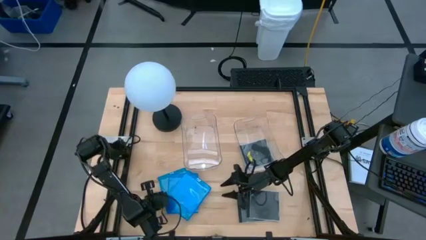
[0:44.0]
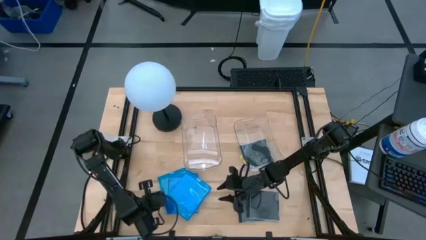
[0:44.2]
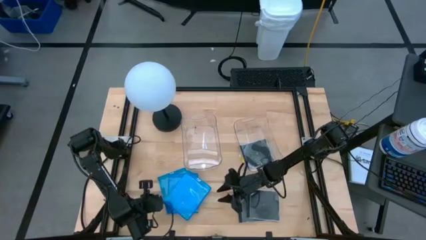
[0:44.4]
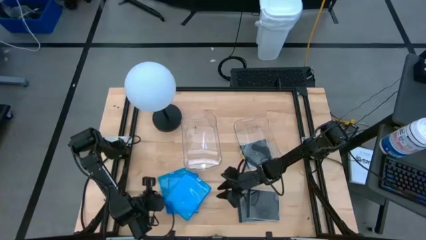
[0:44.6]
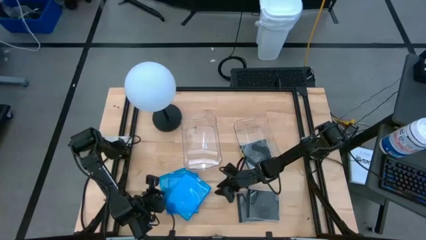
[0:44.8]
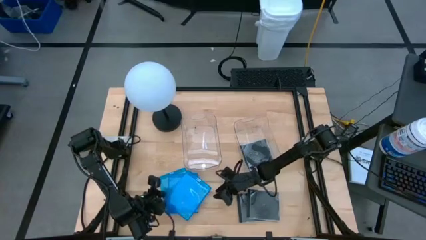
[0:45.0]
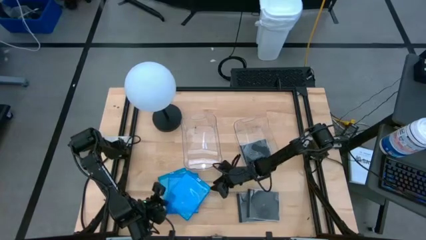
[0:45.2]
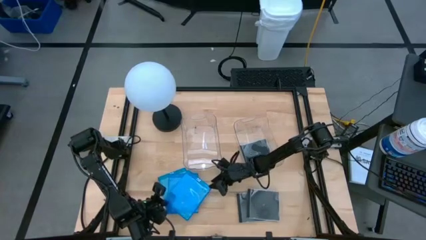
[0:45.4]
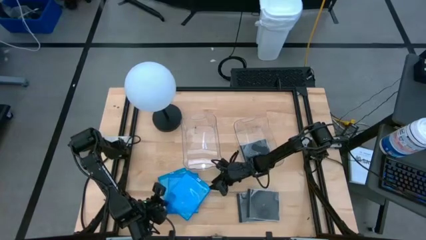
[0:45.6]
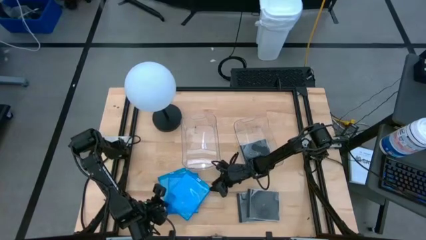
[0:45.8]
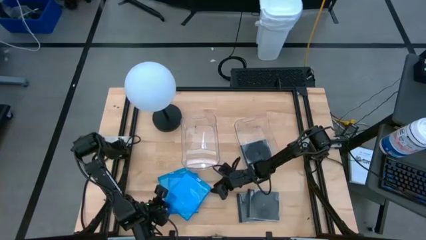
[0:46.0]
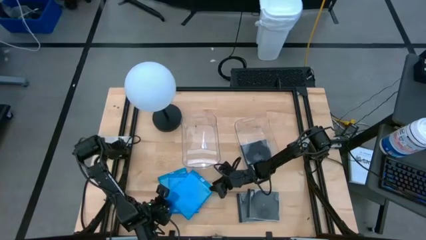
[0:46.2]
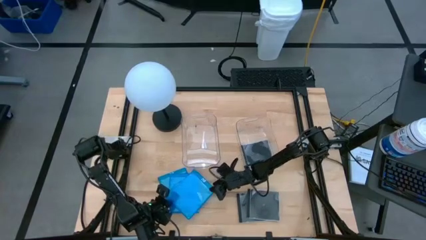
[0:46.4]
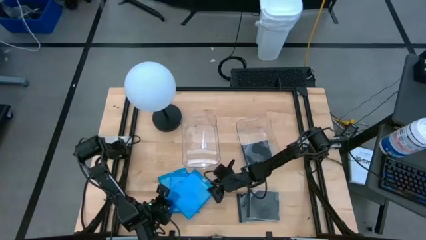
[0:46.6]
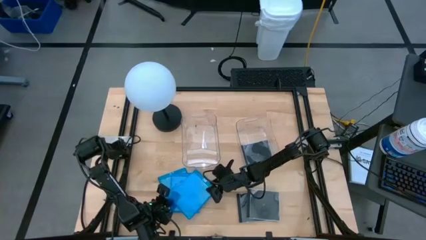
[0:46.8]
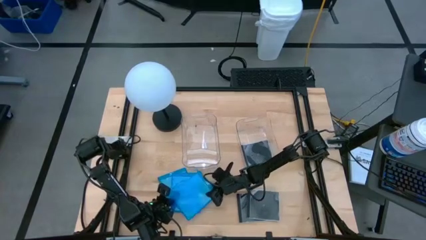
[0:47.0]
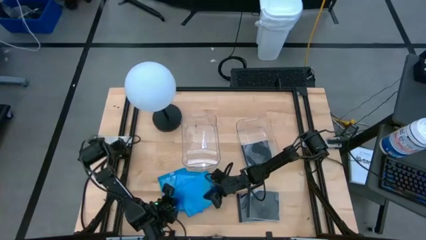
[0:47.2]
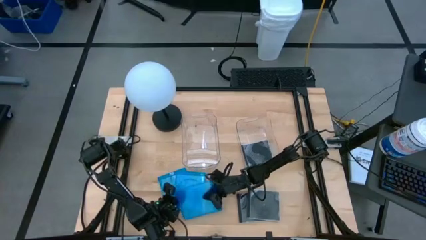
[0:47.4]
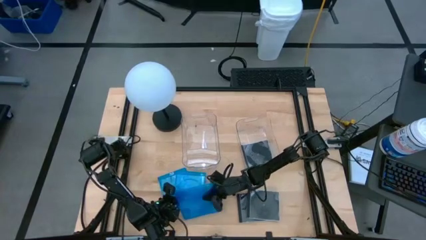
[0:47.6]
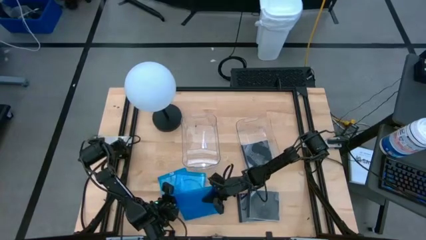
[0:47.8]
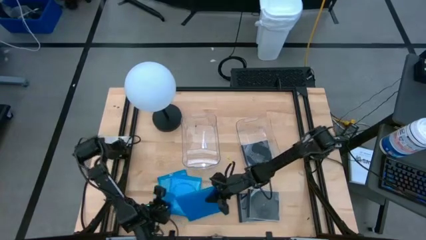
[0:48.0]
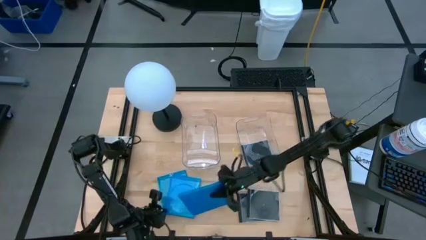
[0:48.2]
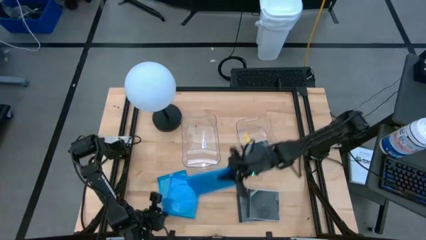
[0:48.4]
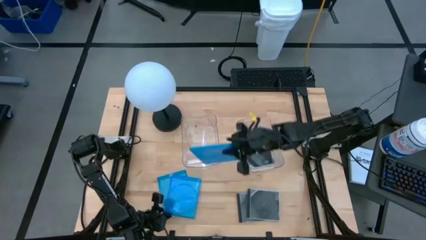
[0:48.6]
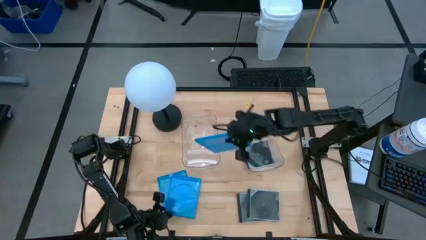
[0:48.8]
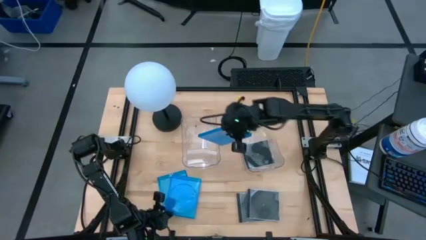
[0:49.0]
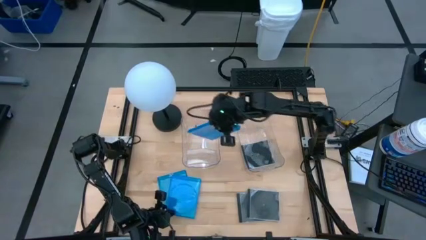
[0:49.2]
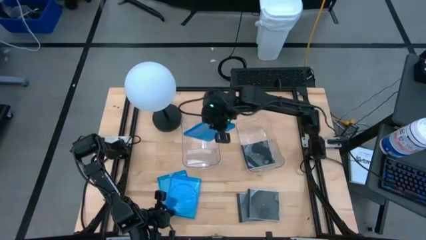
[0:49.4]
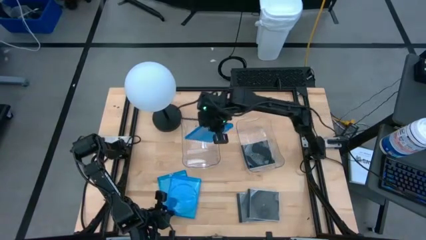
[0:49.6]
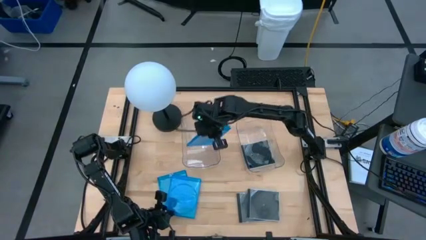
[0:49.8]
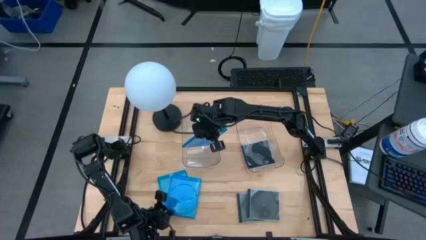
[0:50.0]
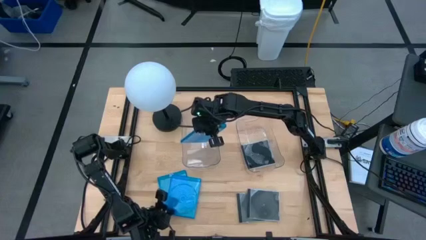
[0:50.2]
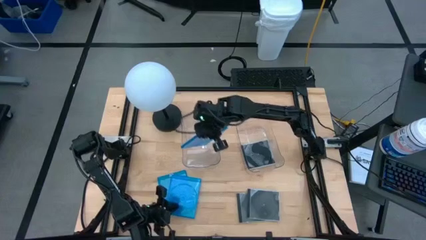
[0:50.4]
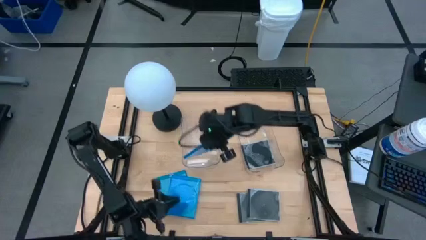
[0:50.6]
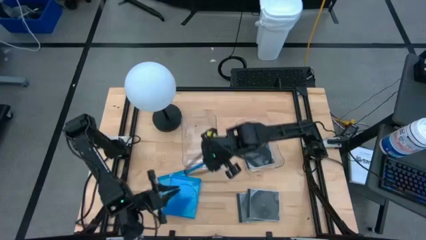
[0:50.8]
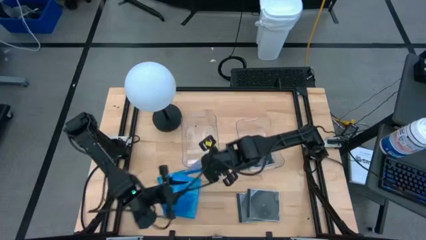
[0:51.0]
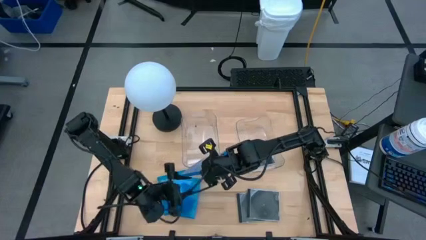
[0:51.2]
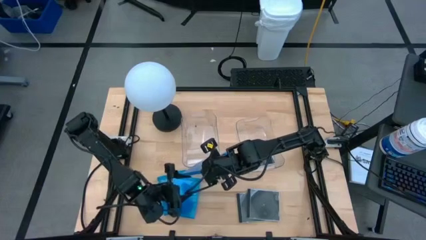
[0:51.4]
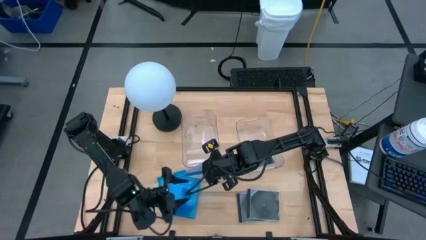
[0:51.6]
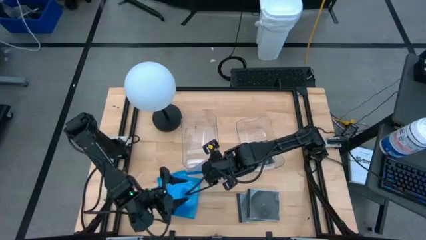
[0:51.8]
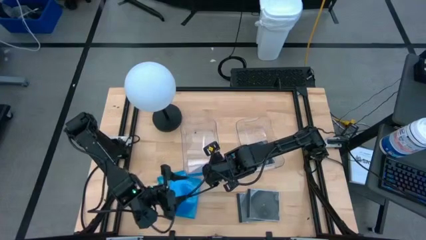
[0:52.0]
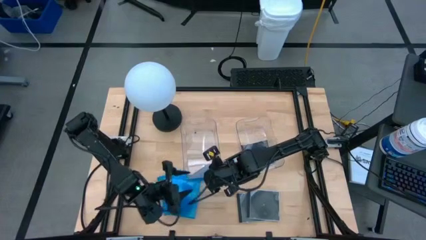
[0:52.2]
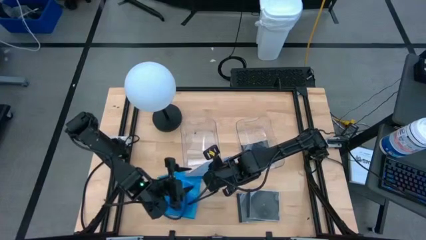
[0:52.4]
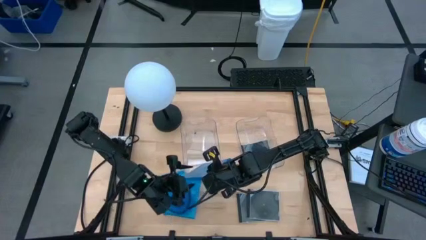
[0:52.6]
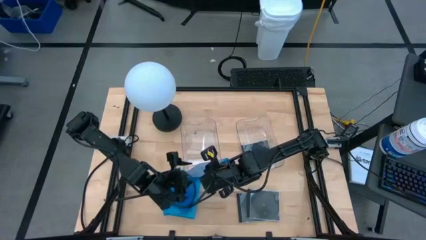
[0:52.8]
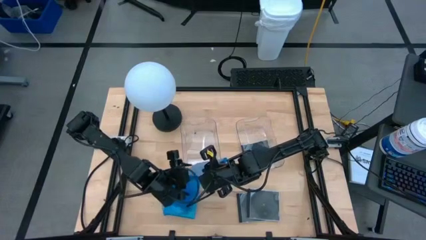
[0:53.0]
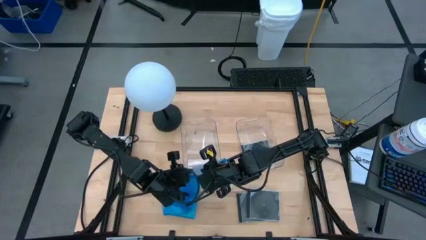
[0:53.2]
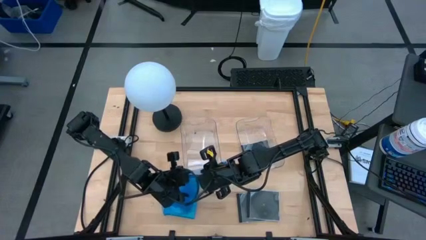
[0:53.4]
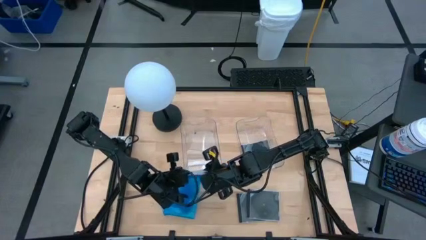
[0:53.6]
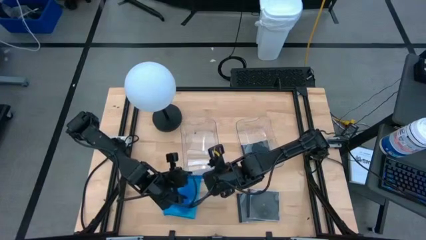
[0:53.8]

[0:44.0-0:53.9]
Task: Pick & place jewel cases by type
Put the blue CD case into the left transparent bin

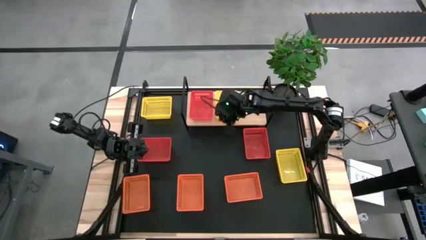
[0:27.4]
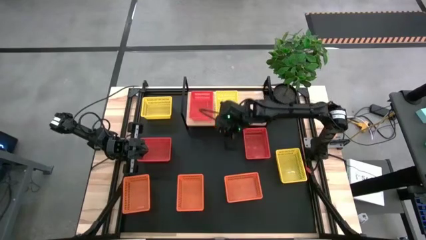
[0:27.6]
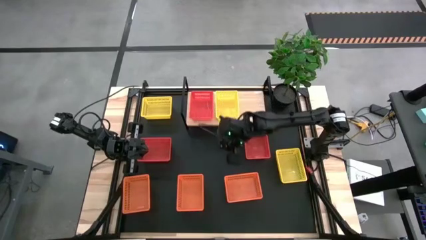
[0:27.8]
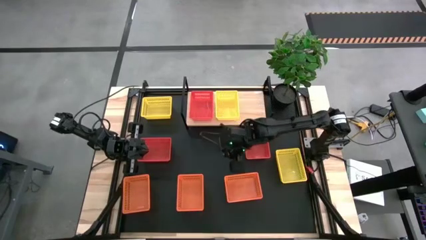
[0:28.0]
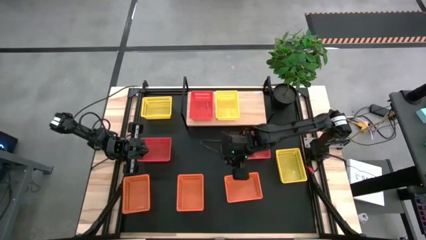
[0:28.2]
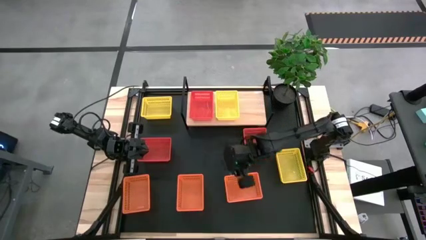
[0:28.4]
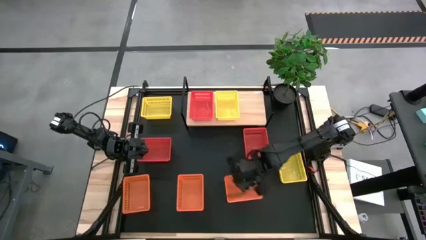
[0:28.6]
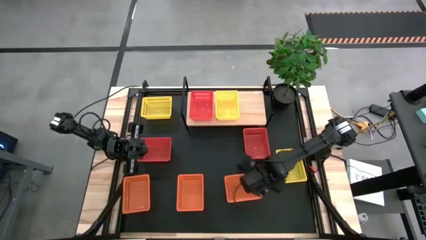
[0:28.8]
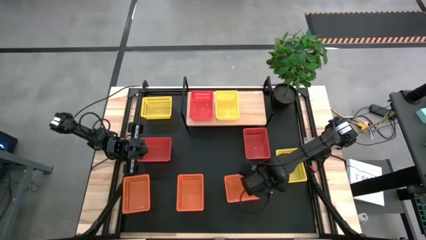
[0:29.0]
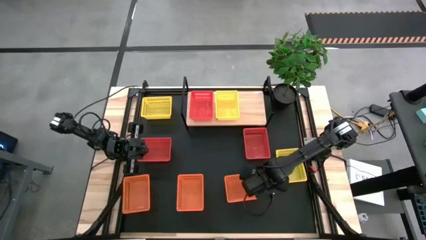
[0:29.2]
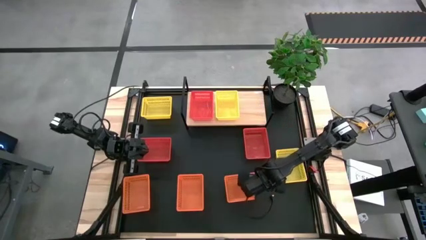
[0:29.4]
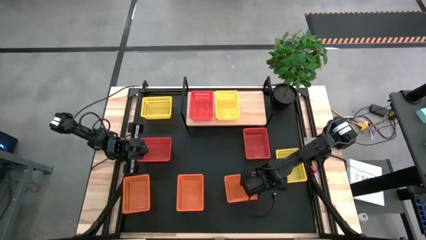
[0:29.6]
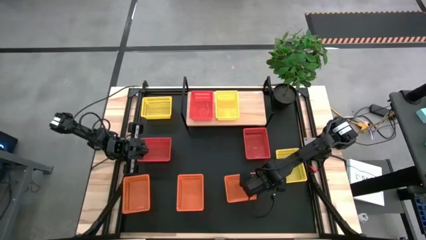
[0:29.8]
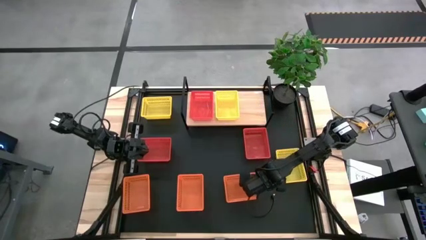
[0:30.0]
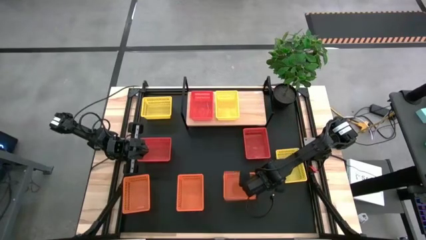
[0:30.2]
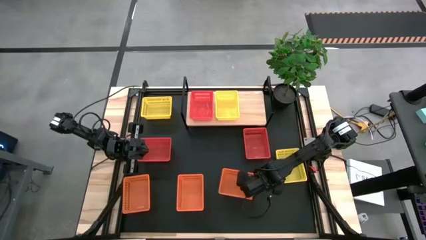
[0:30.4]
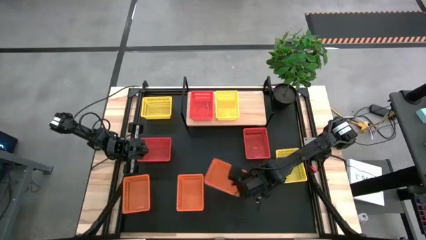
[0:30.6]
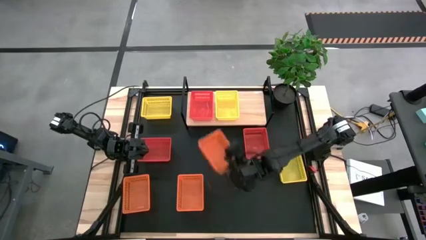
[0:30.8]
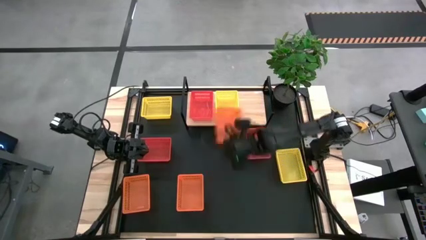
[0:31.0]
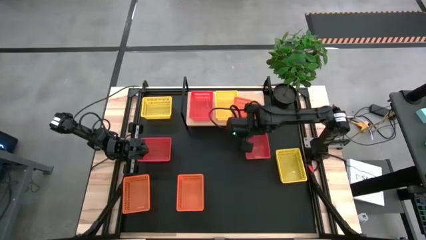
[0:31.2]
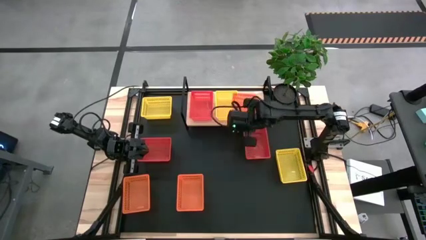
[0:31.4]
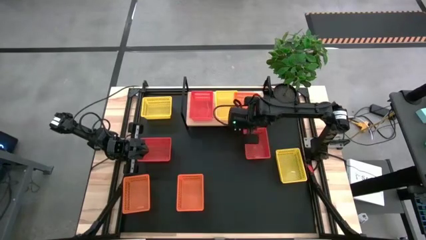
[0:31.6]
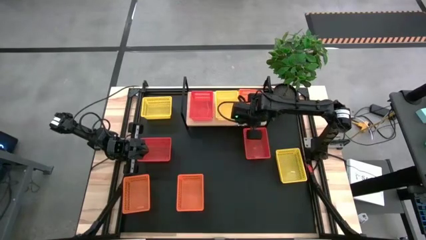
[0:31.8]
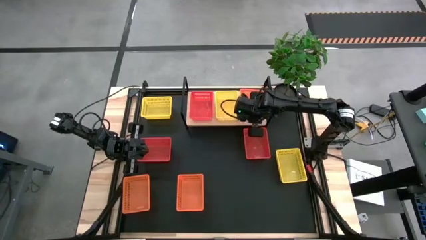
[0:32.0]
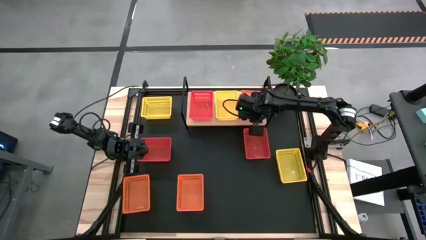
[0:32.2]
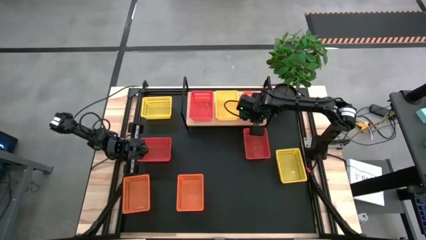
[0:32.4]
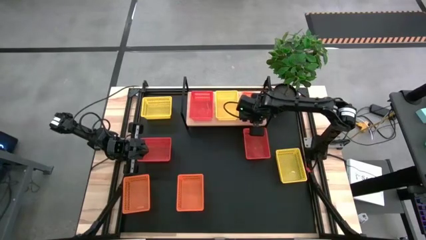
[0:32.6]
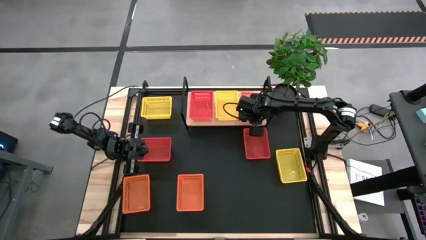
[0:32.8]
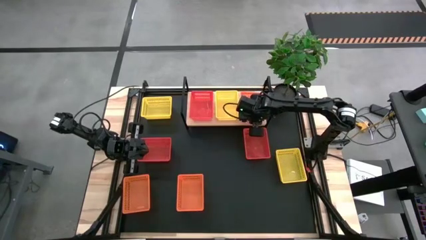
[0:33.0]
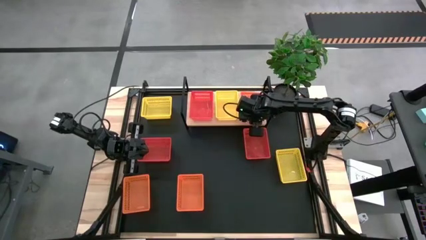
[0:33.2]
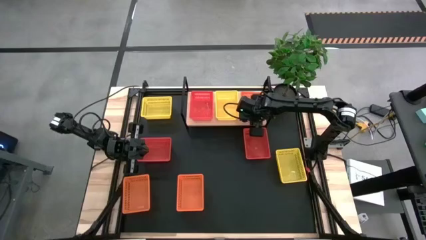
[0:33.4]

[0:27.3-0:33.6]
Task: Stack baskets on shelf by color
Put the right orange bin on the shelf
